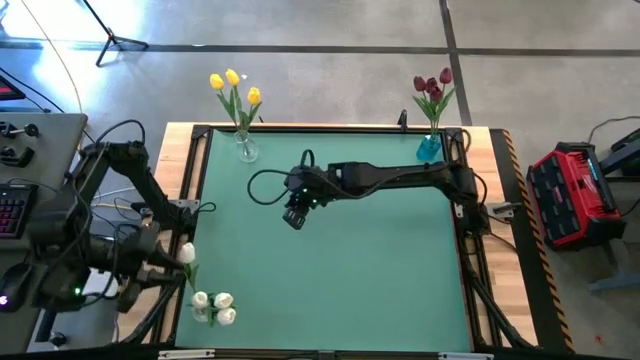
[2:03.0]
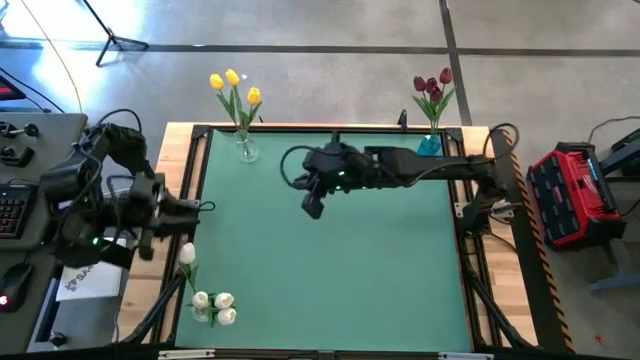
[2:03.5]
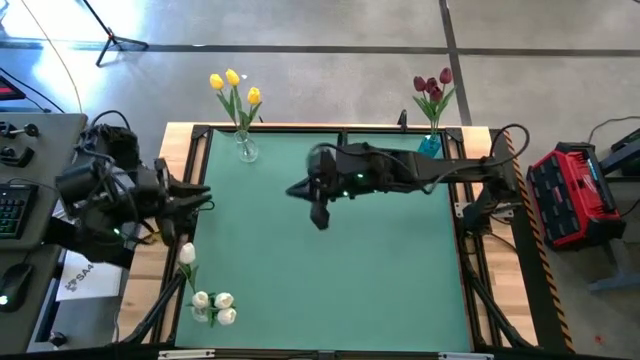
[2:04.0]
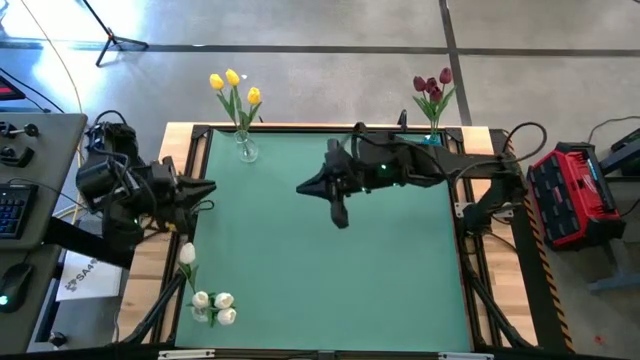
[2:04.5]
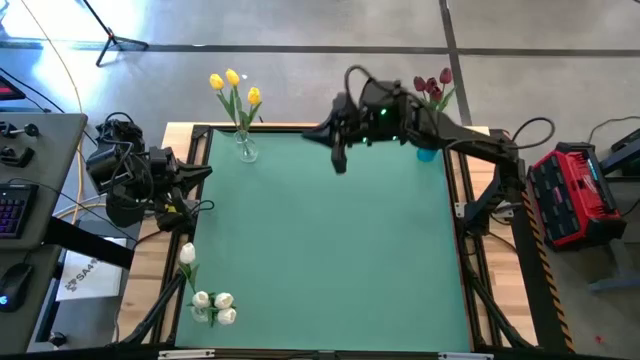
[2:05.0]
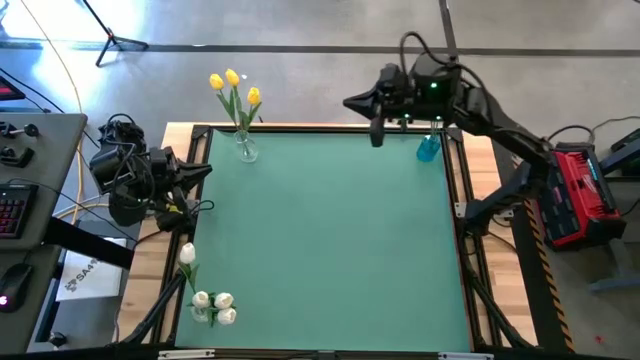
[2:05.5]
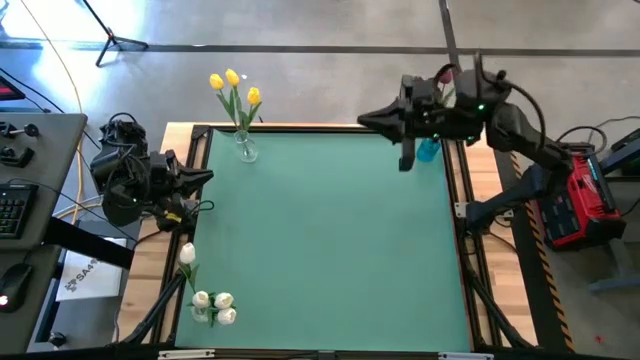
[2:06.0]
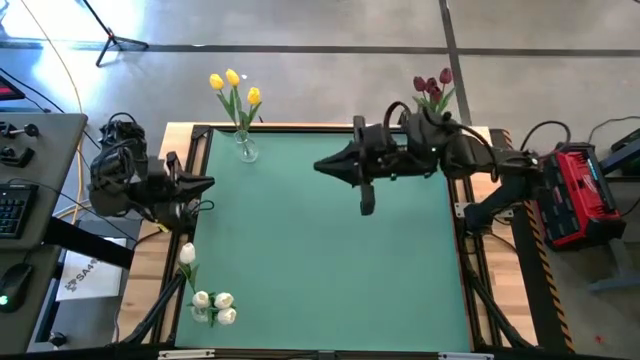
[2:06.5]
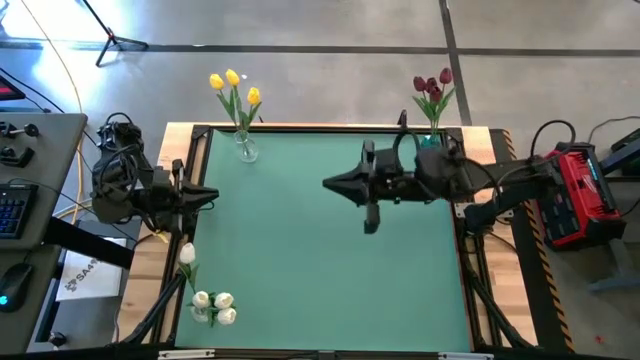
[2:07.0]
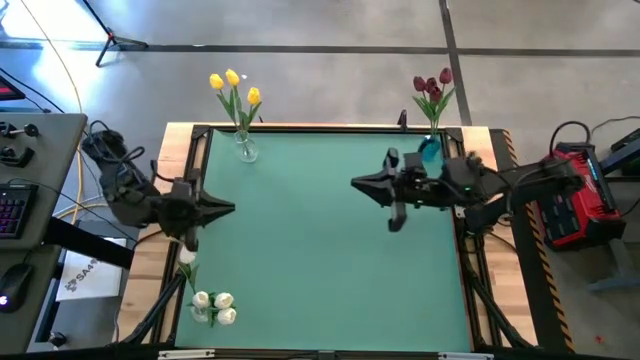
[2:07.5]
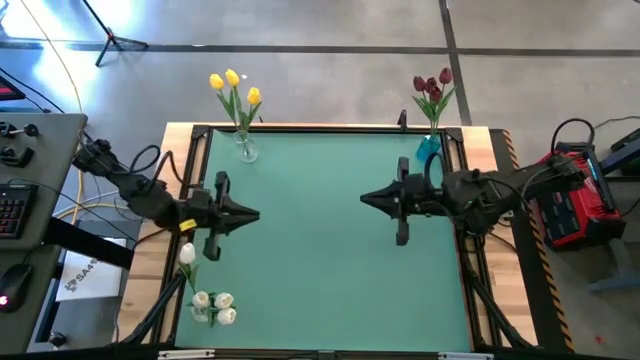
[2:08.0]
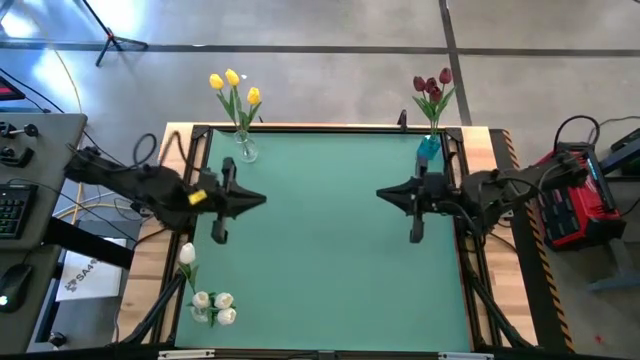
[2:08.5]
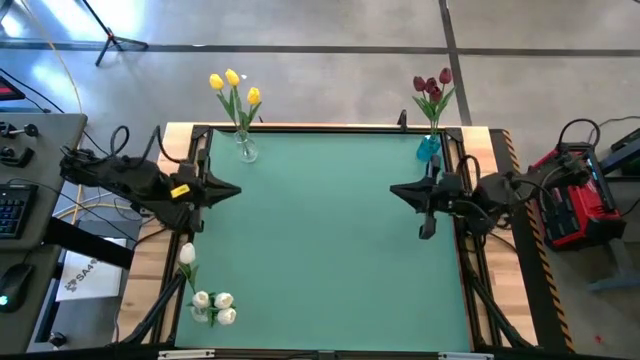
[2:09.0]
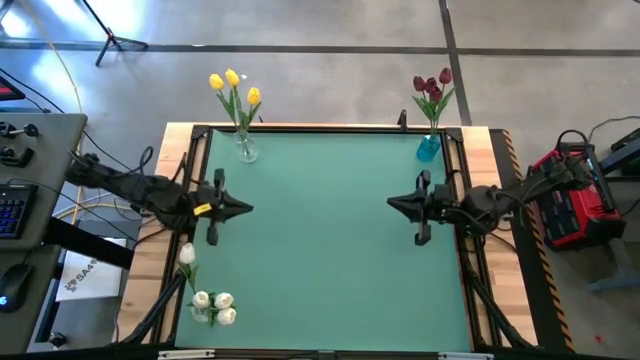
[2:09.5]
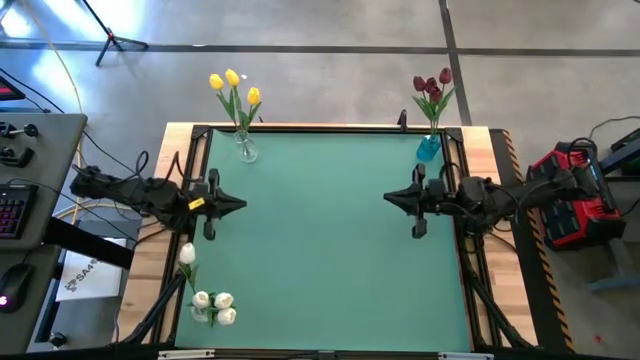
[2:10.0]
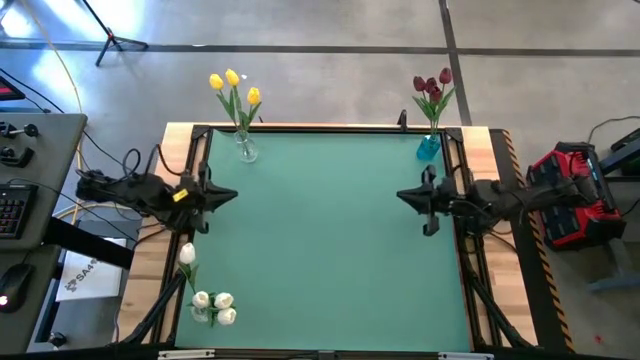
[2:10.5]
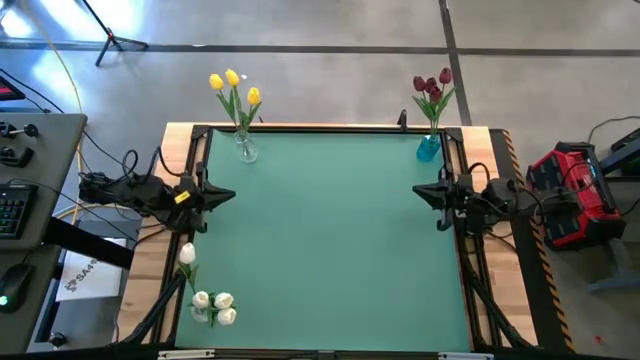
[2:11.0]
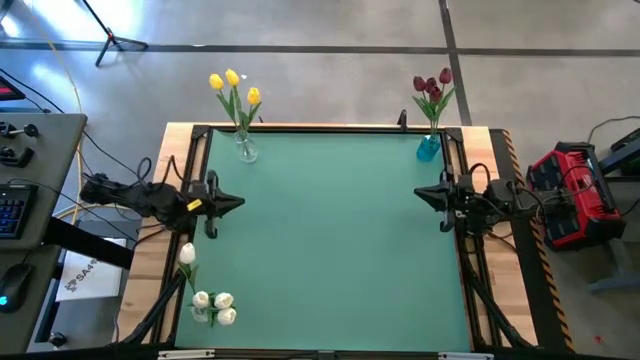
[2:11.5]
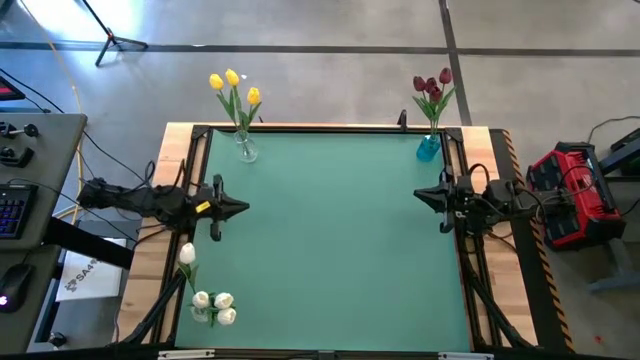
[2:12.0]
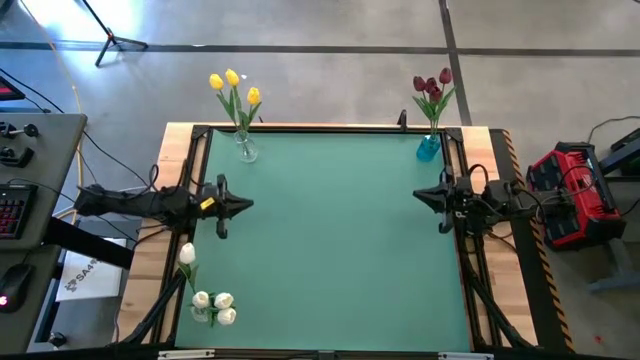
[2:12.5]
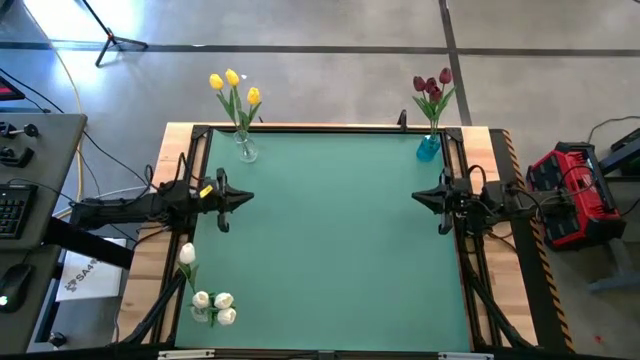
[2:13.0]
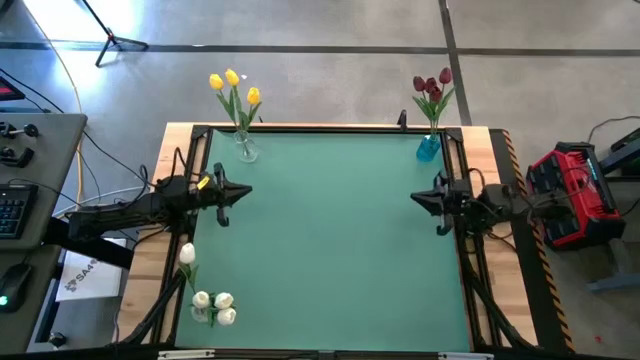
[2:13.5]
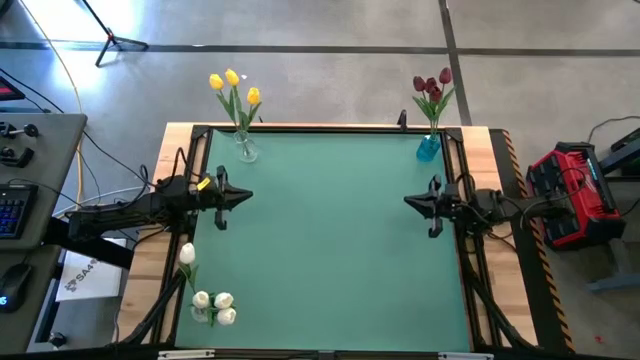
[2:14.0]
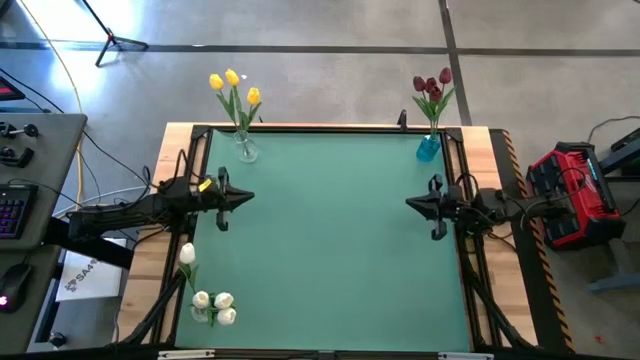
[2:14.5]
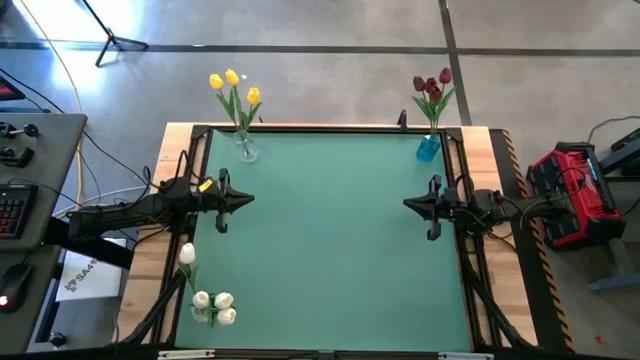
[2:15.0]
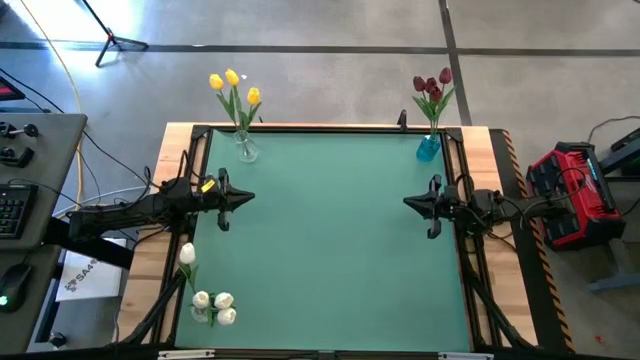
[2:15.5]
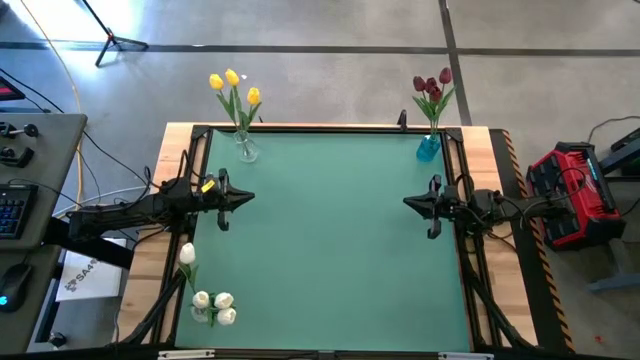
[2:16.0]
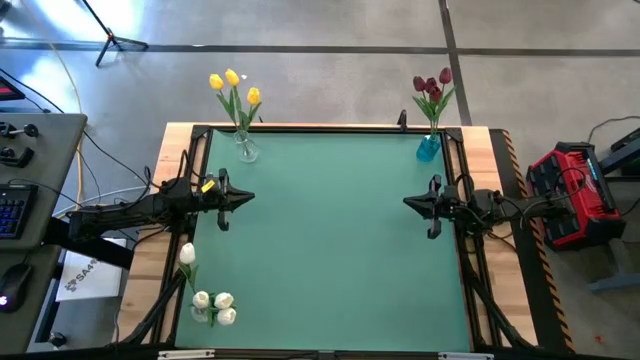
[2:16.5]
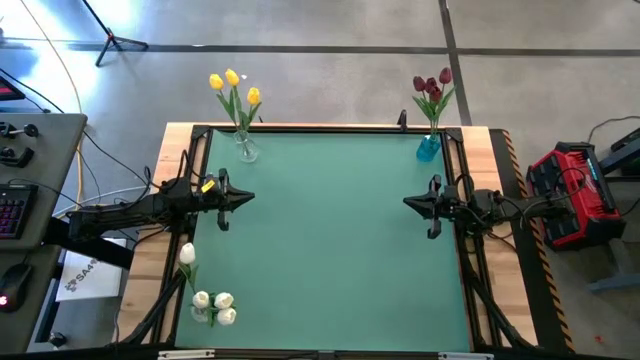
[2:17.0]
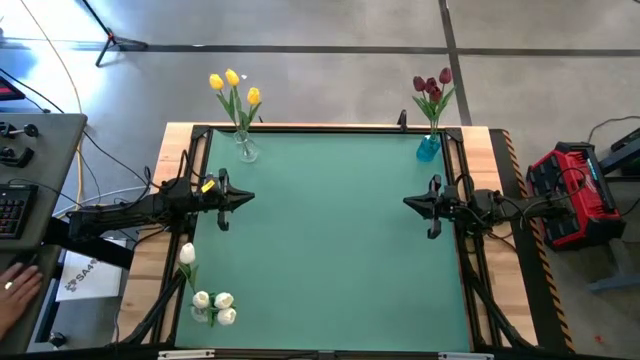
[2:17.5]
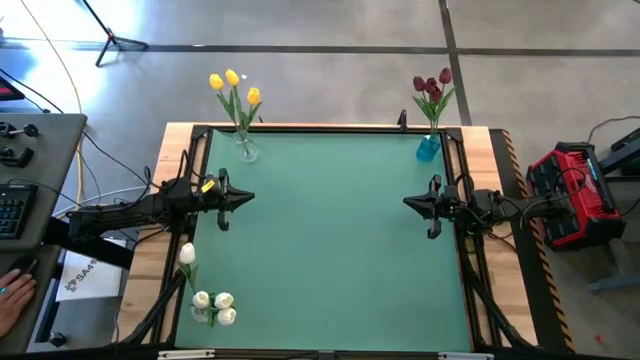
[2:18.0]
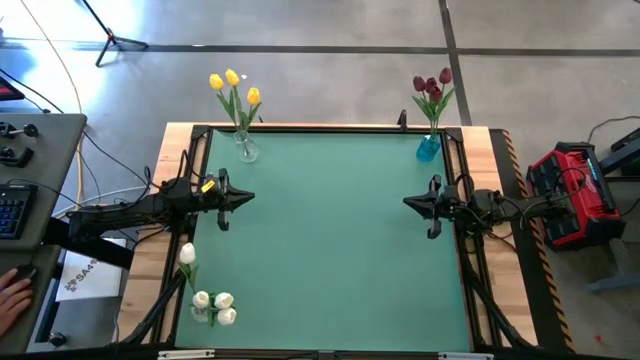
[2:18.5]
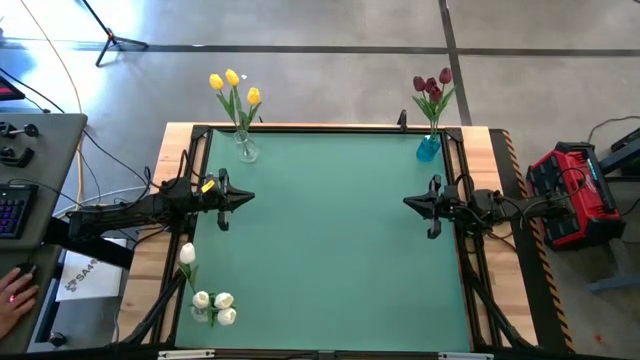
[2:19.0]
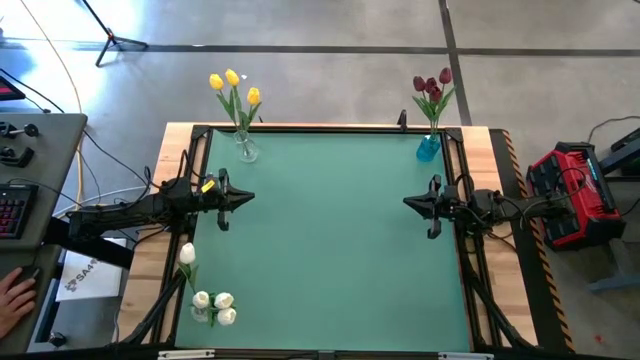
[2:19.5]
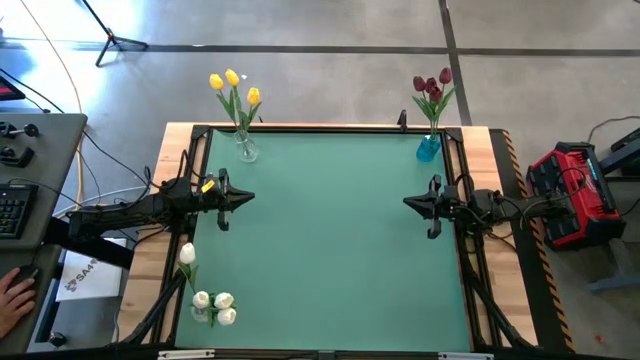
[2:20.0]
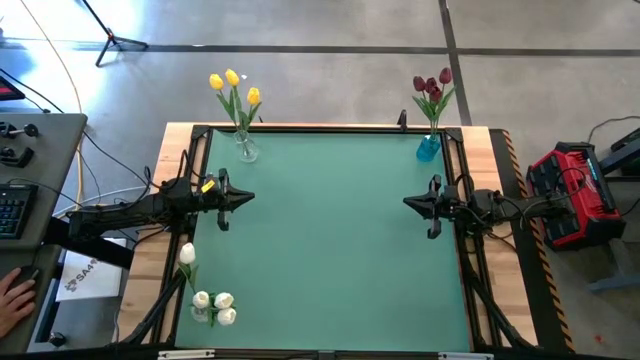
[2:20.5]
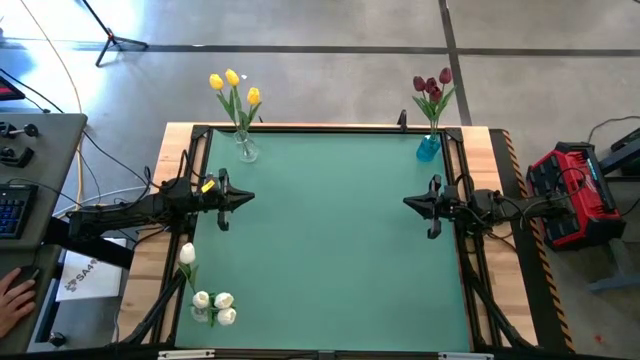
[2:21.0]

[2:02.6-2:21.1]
Task: Sort flowers into vase by color
Return to Home Position

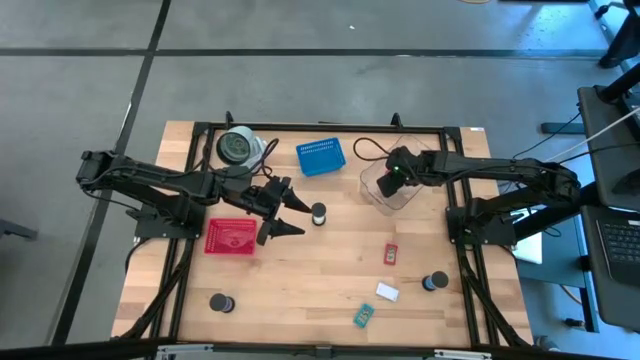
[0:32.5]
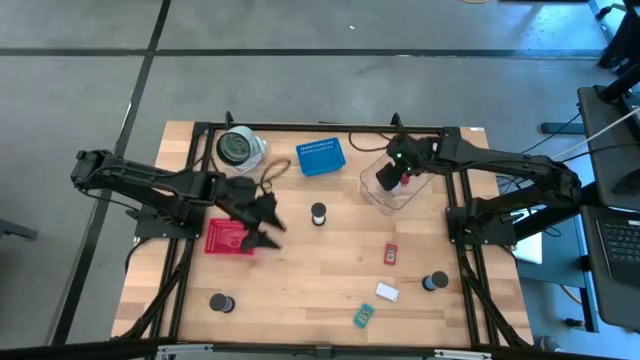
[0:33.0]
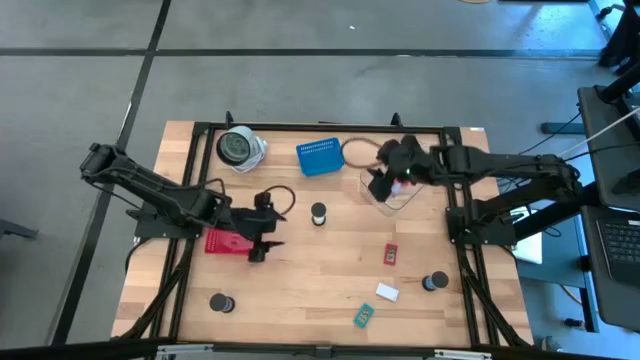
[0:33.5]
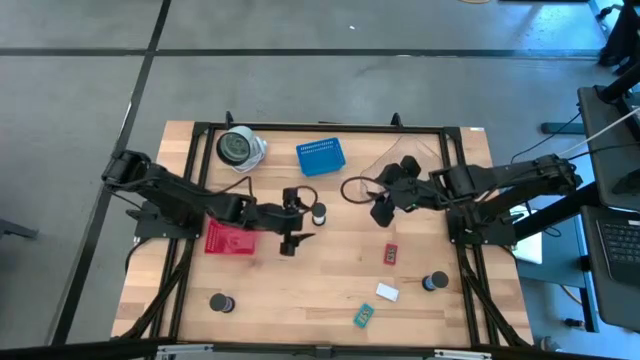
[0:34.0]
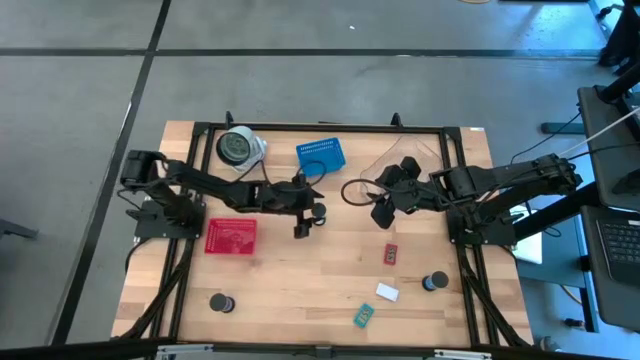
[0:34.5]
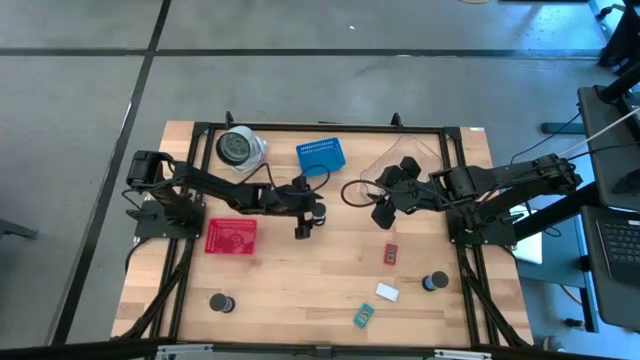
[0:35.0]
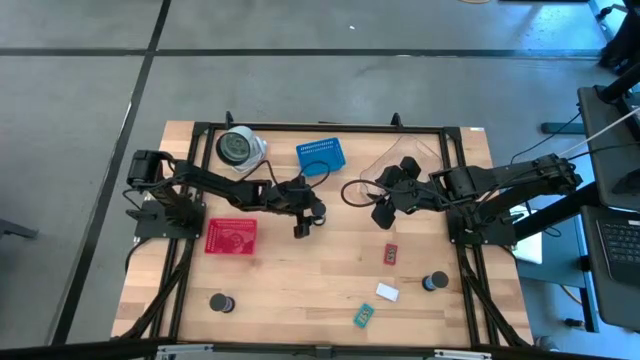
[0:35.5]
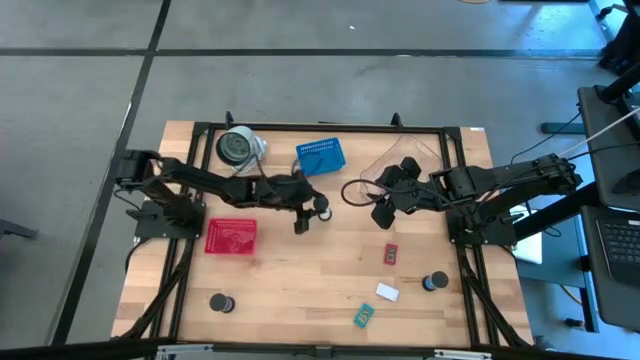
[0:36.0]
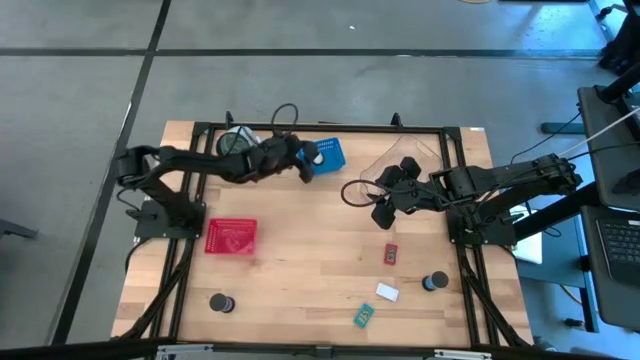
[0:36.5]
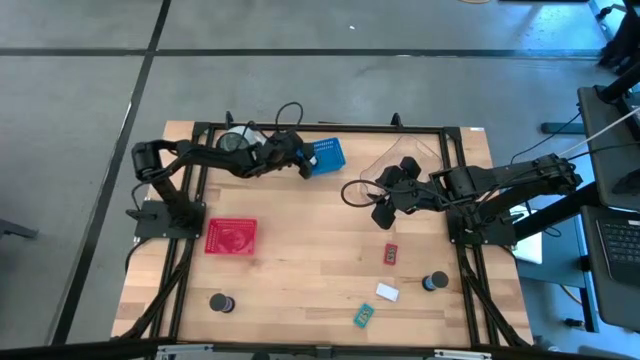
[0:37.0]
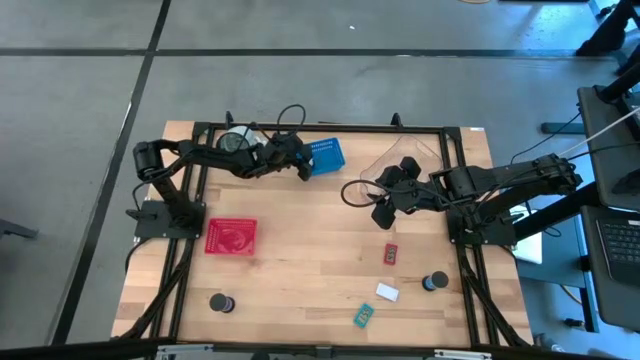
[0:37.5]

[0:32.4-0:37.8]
Task: Pick & Place Office items
Put the middle black hourglass into the blue basket
